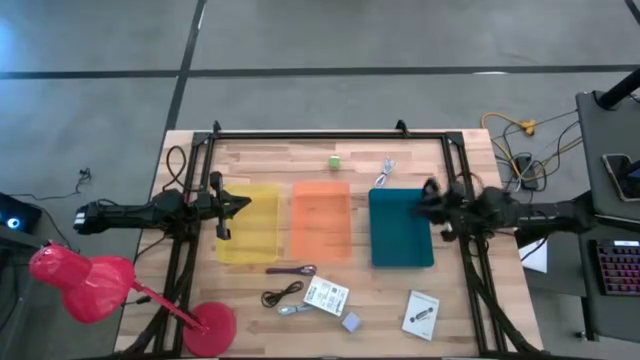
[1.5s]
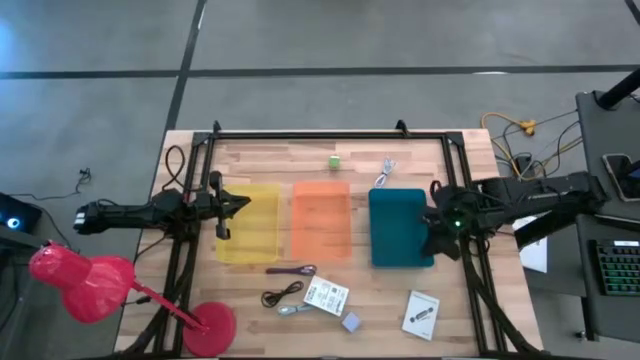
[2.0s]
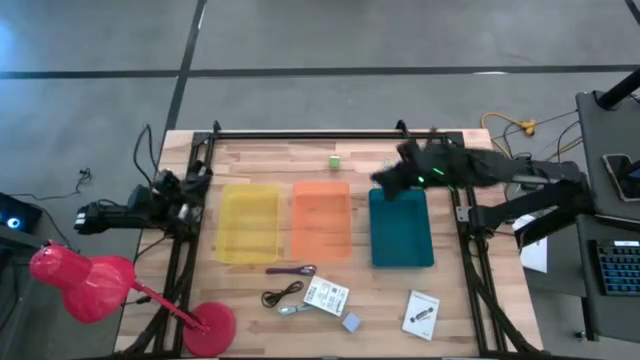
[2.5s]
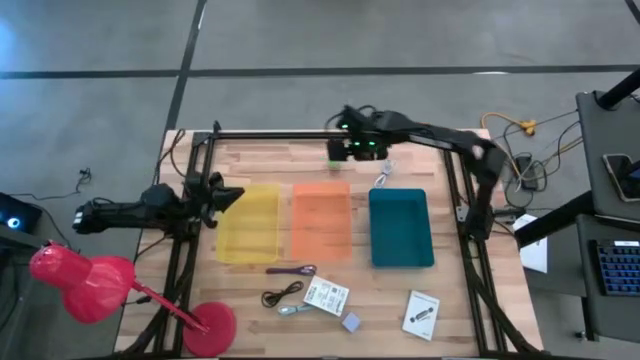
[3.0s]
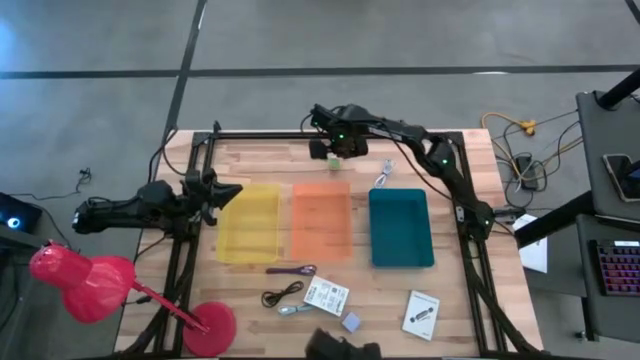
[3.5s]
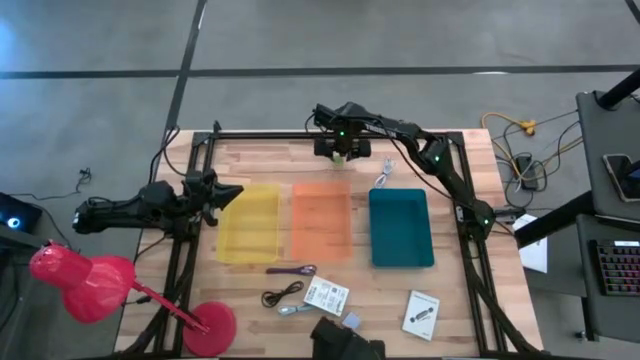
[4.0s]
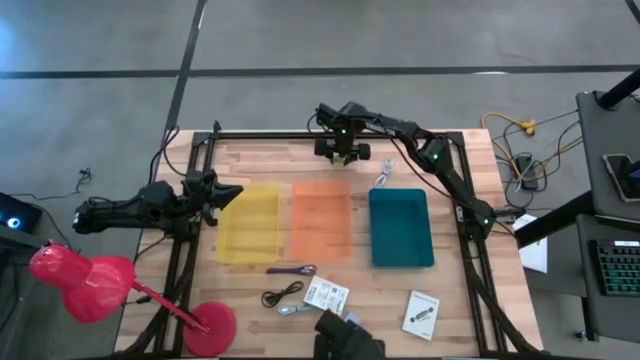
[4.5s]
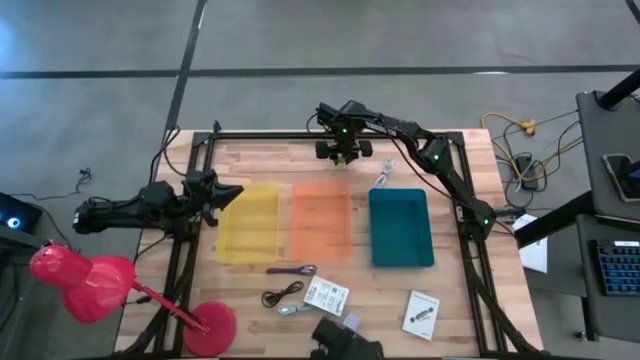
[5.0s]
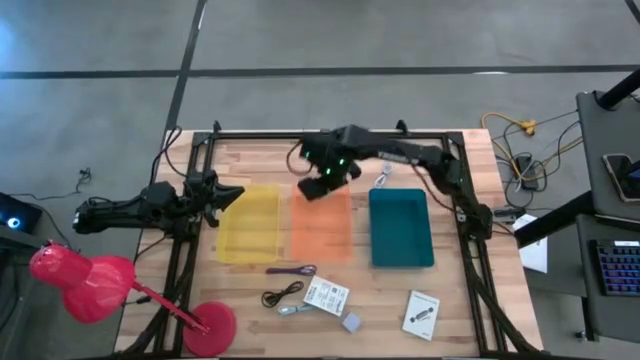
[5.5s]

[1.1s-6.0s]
Task: Pick and place items into bin
Put the green charger adapter into the orange bin

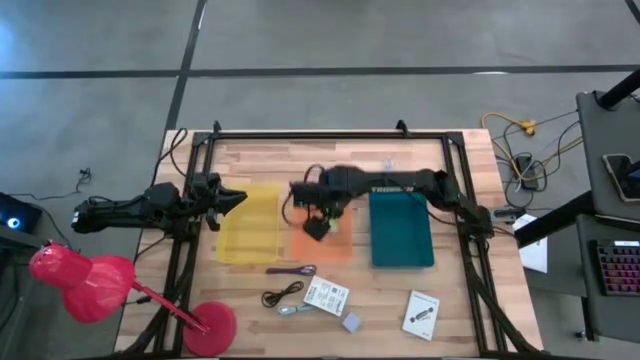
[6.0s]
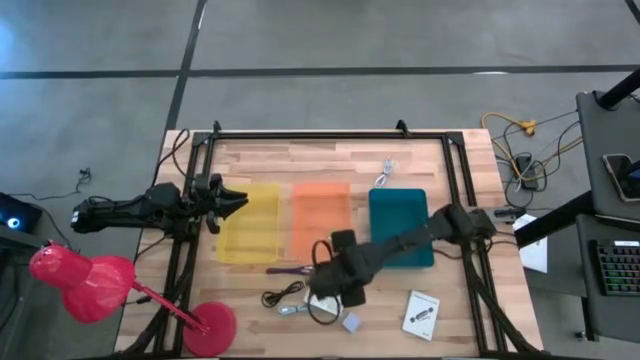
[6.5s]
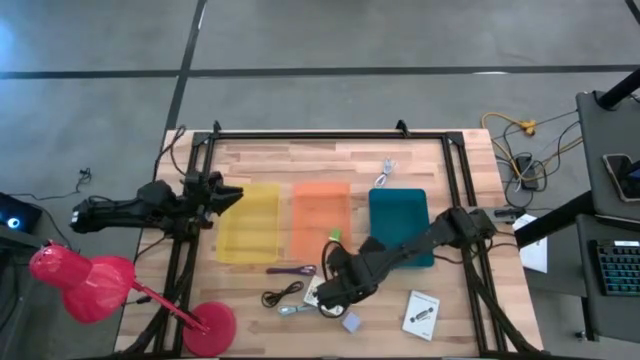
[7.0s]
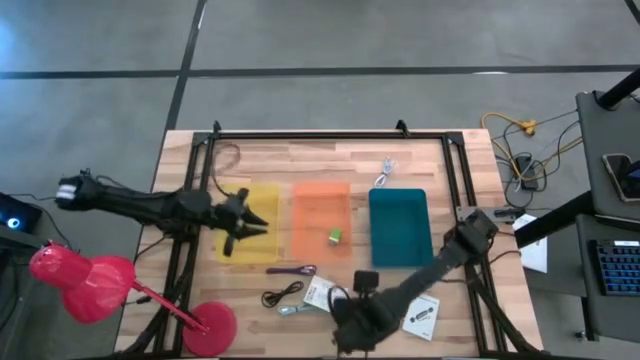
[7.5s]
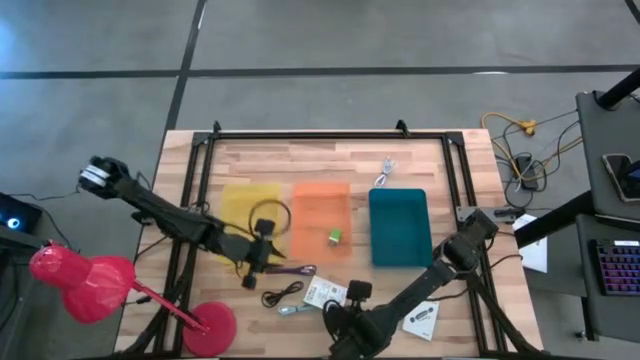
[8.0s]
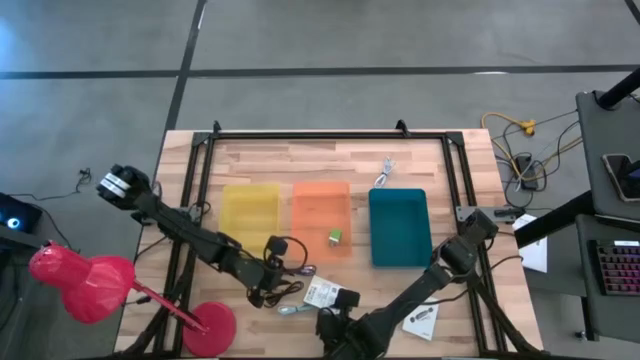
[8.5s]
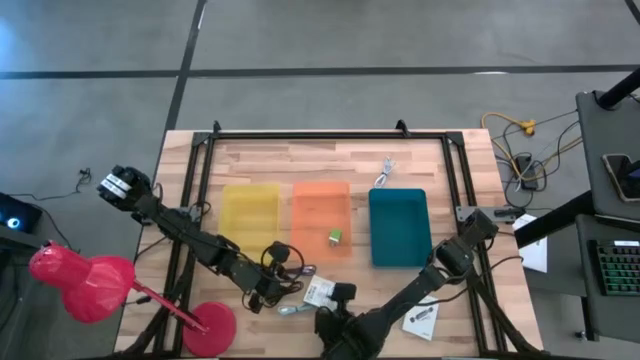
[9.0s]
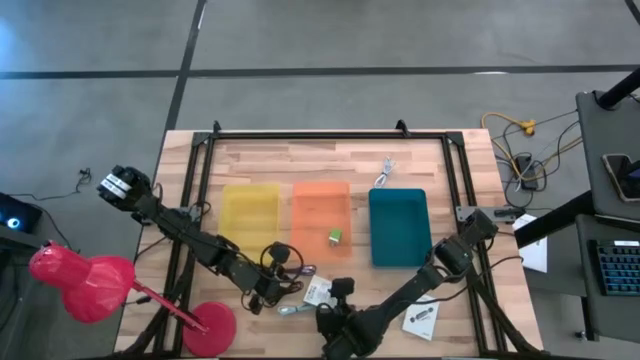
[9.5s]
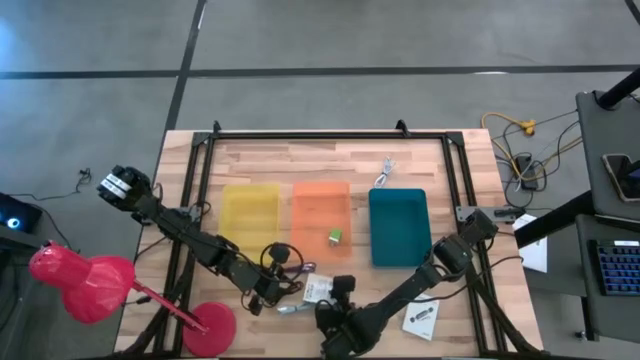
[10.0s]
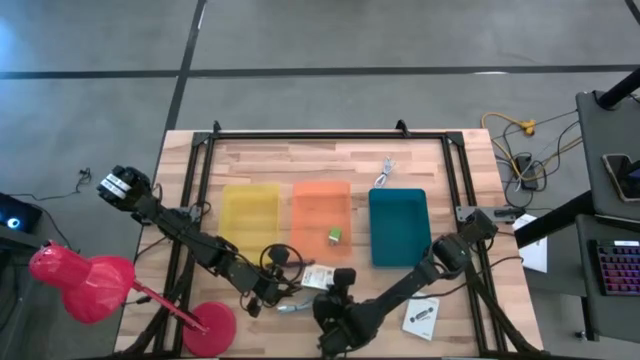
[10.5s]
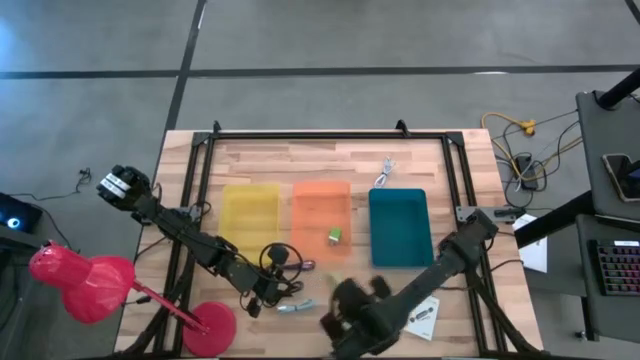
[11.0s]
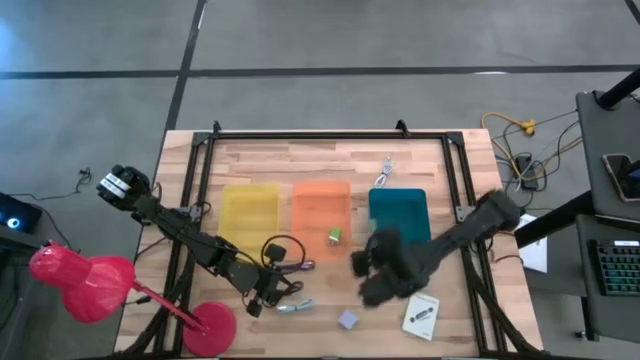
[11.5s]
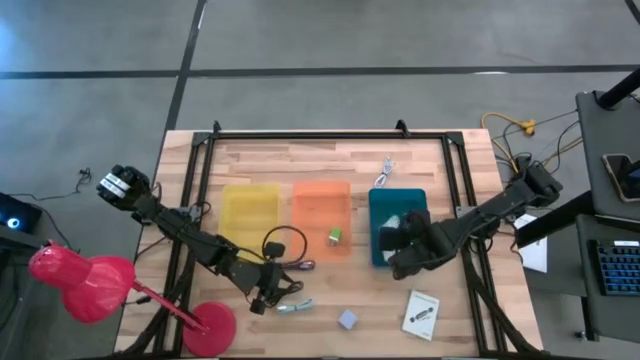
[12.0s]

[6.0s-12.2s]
Put the left white card reader box into the blue bin

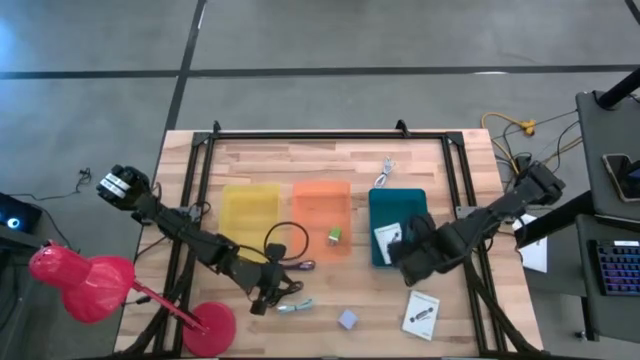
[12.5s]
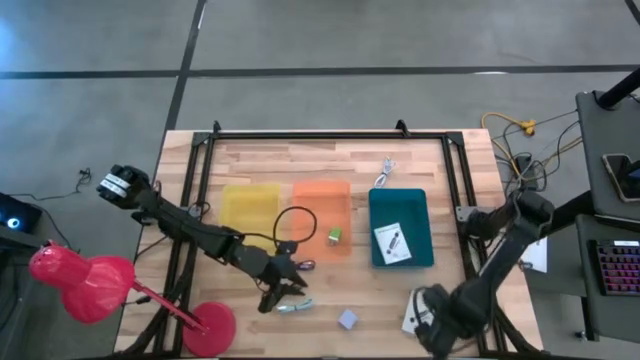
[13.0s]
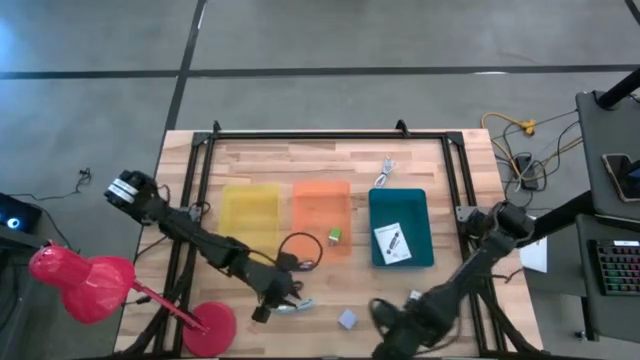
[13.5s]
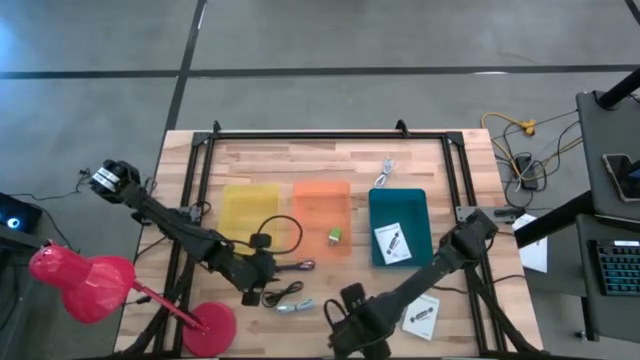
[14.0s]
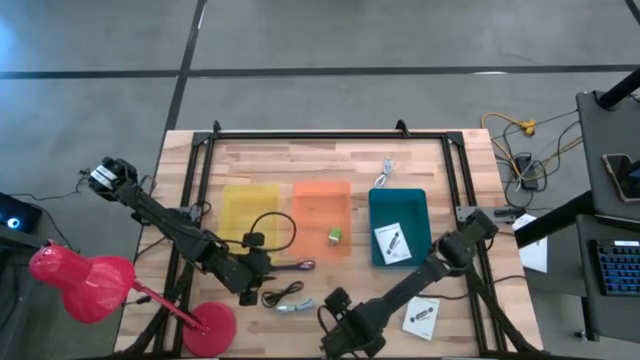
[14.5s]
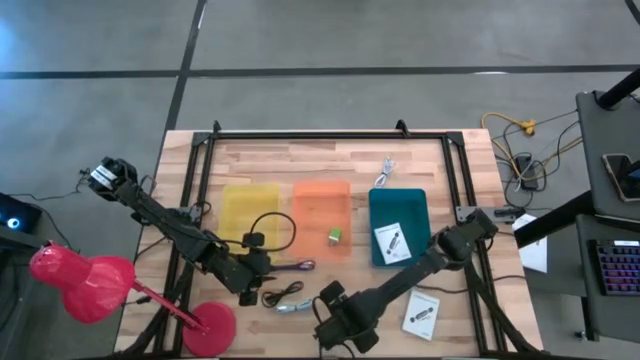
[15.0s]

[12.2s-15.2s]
Put the white charger adapter into the orange bin

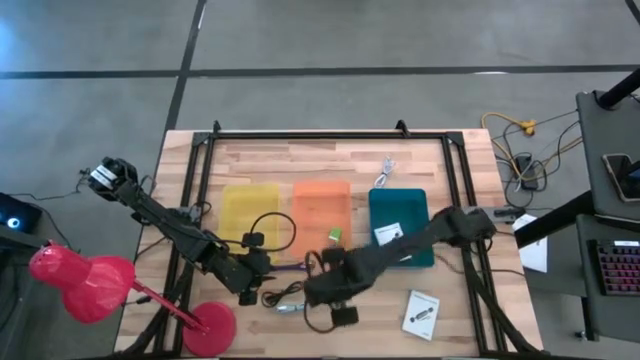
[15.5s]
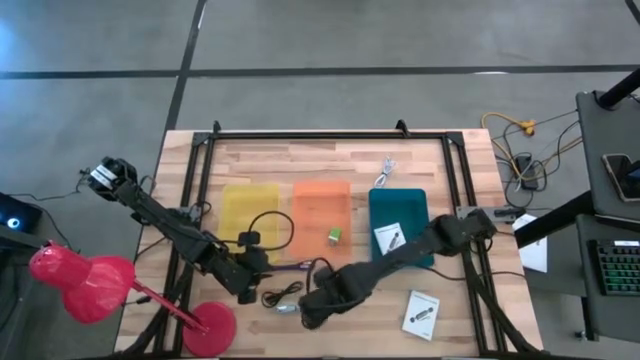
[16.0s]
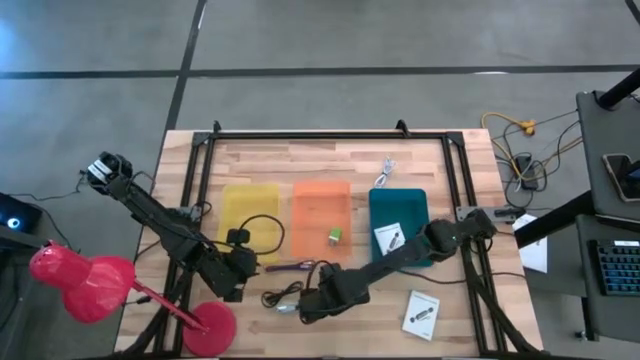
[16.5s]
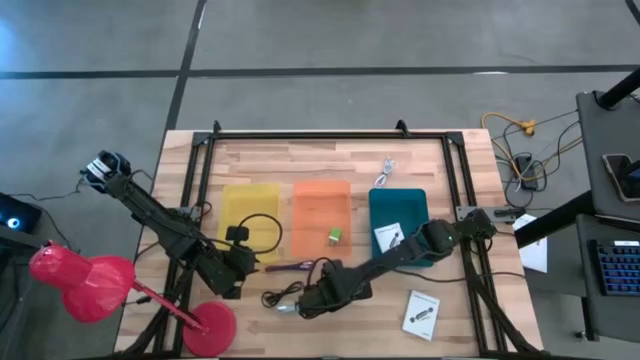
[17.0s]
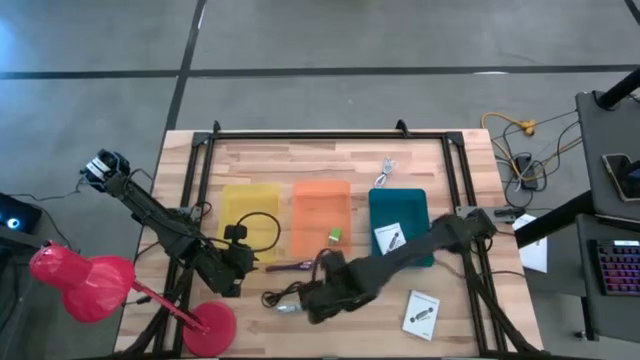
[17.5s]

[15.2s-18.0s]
Put the white charger adapter into the orange bin

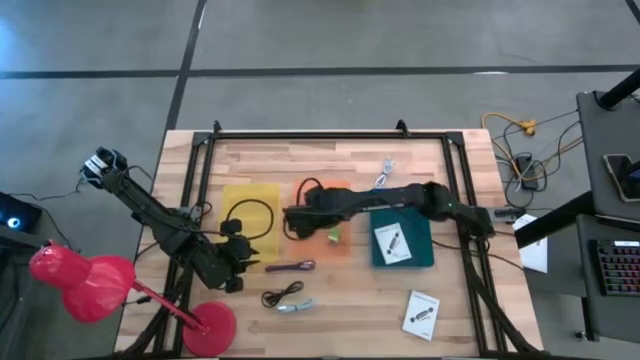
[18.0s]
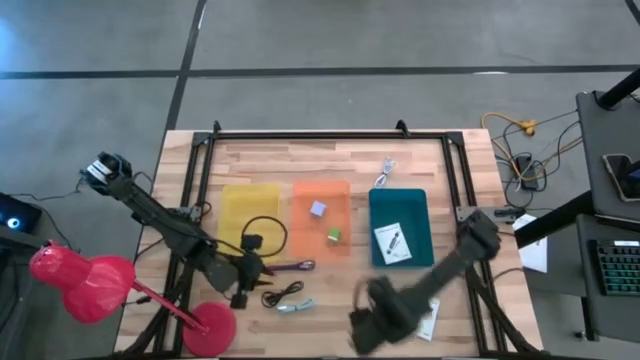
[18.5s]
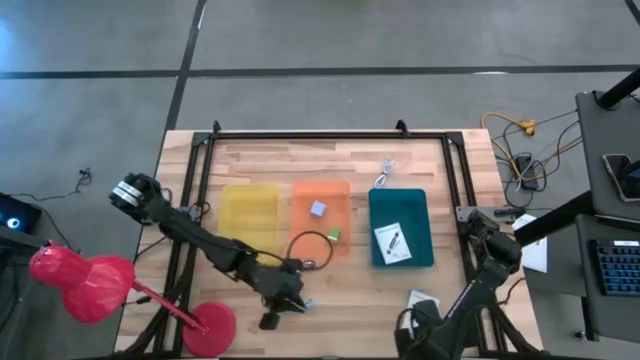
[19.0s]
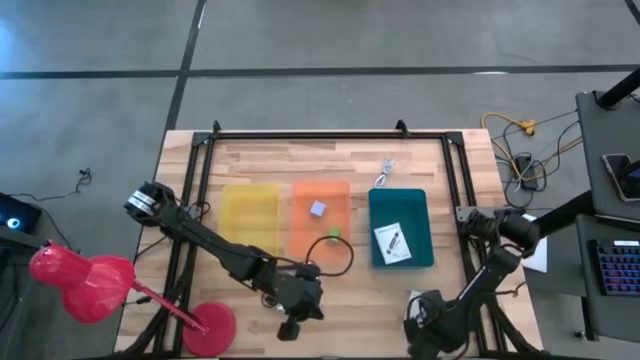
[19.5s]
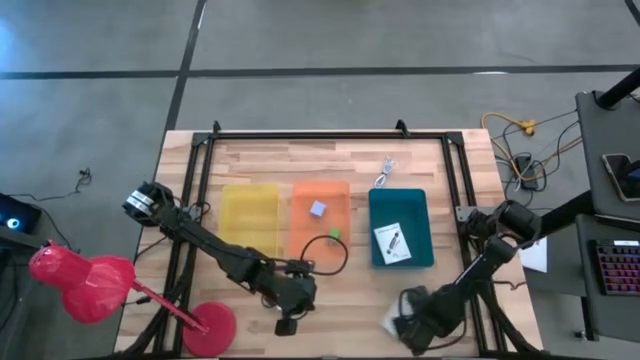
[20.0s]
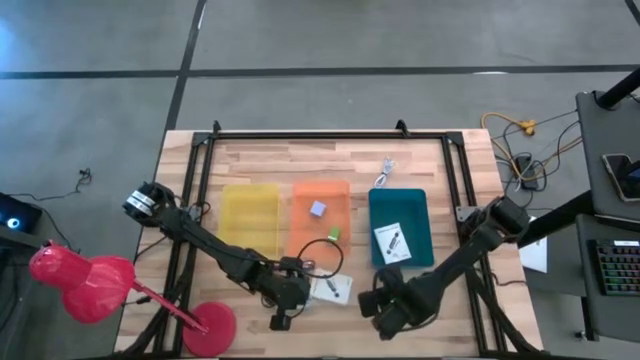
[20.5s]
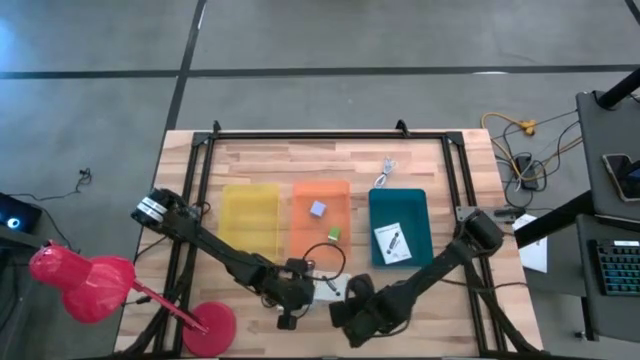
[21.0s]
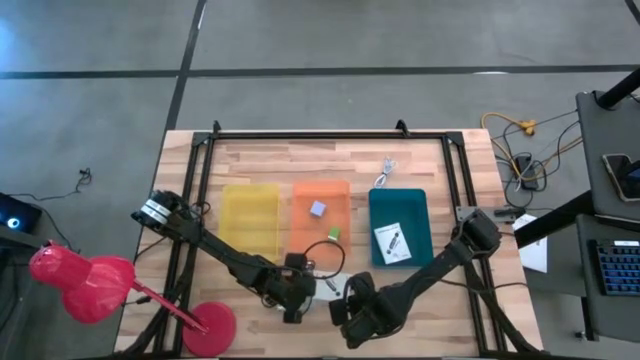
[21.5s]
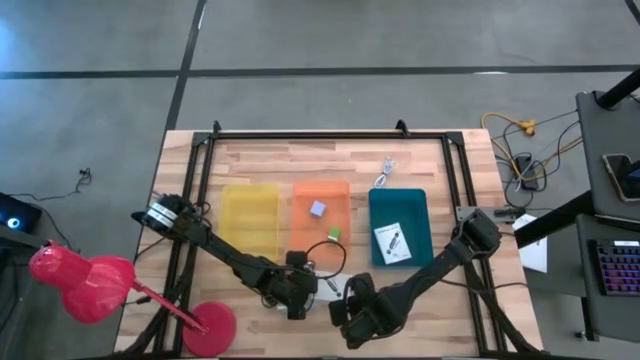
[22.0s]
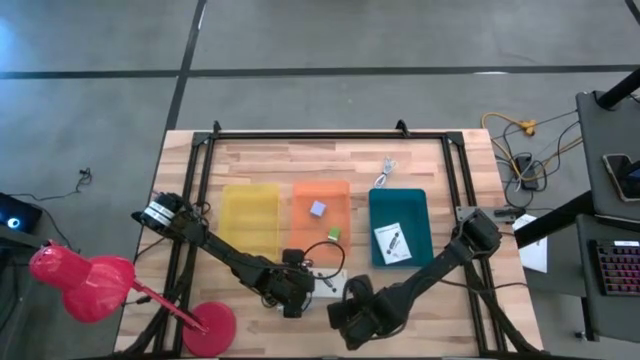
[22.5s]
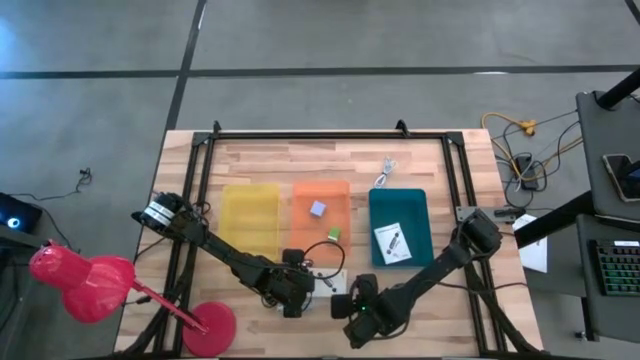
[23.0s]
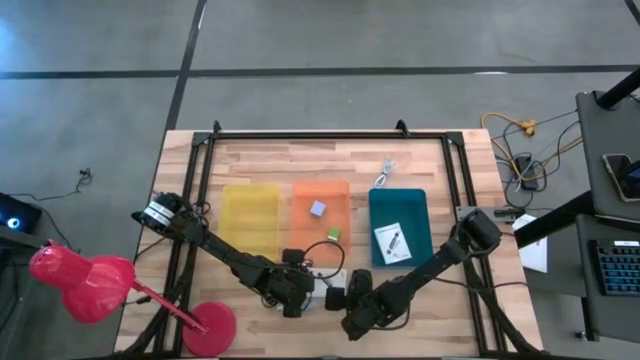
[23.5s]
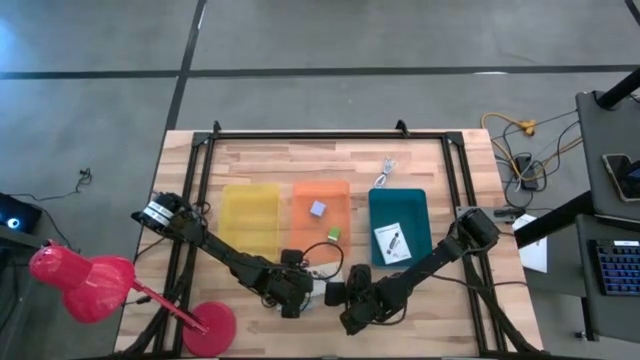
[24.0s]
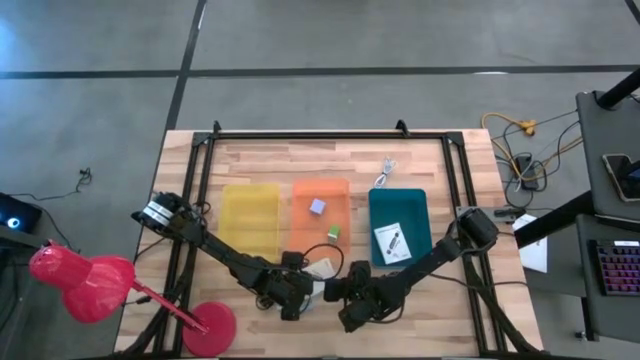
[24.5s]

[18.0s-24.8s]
Put the white card reader box into the blue bin
